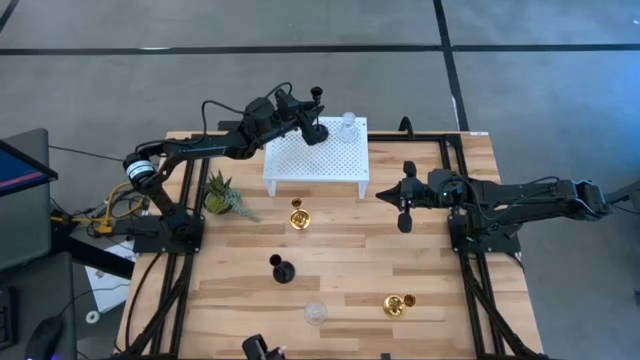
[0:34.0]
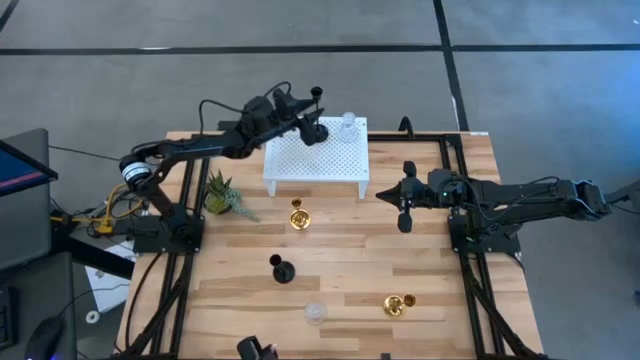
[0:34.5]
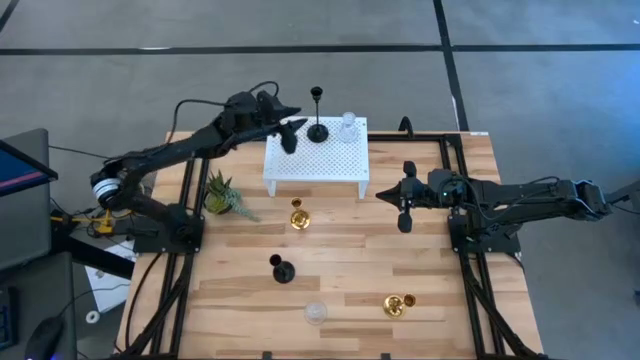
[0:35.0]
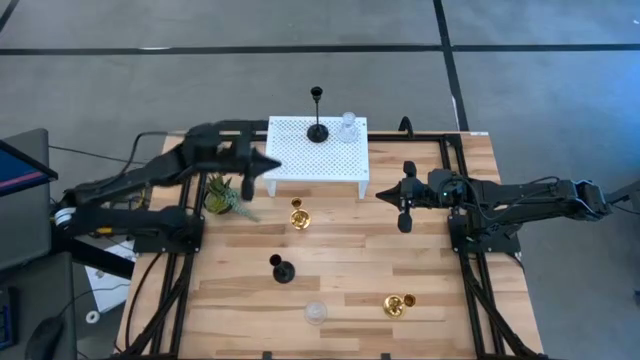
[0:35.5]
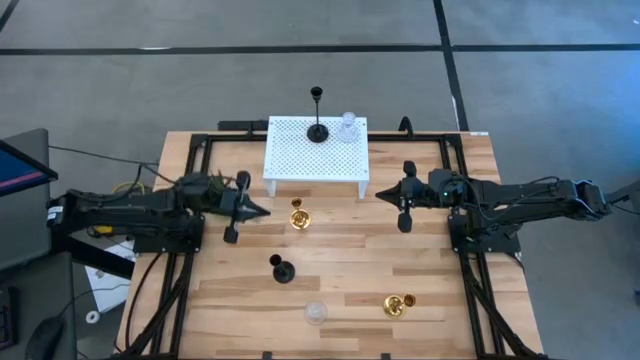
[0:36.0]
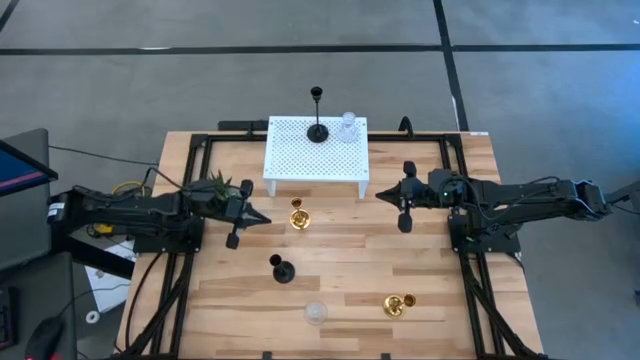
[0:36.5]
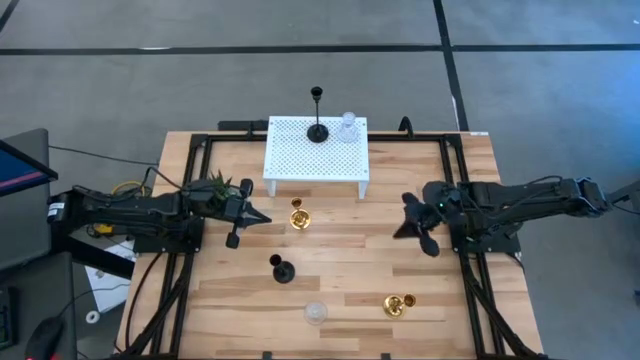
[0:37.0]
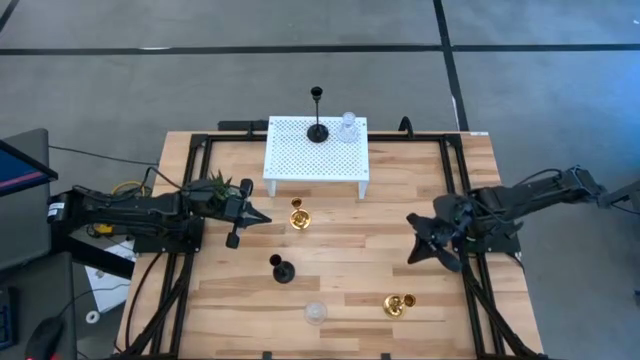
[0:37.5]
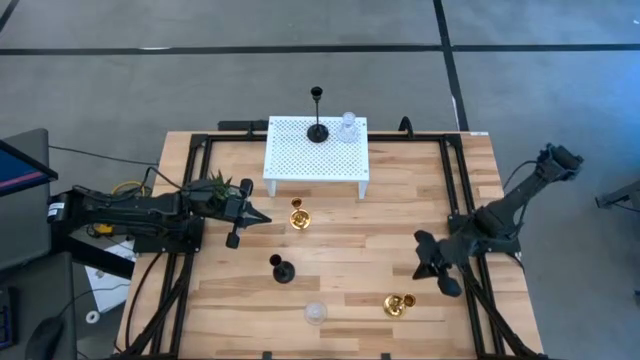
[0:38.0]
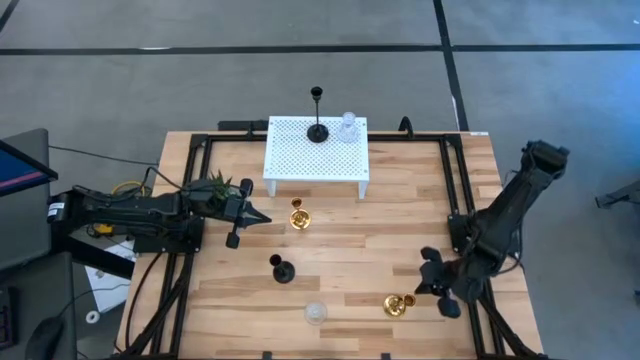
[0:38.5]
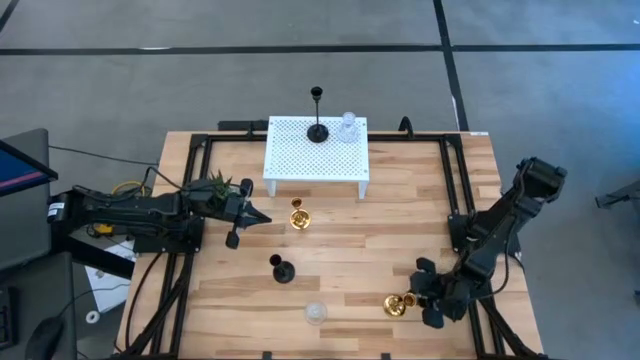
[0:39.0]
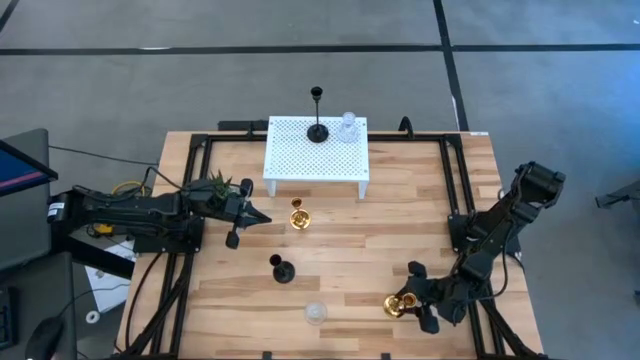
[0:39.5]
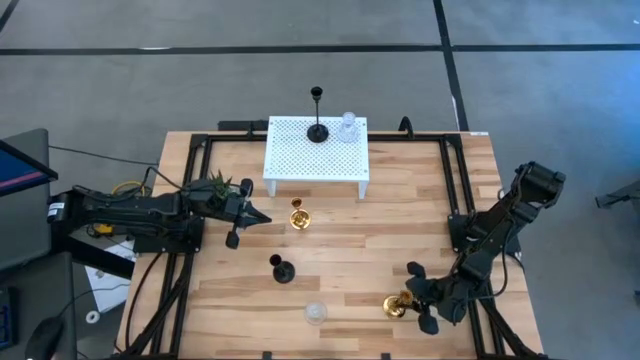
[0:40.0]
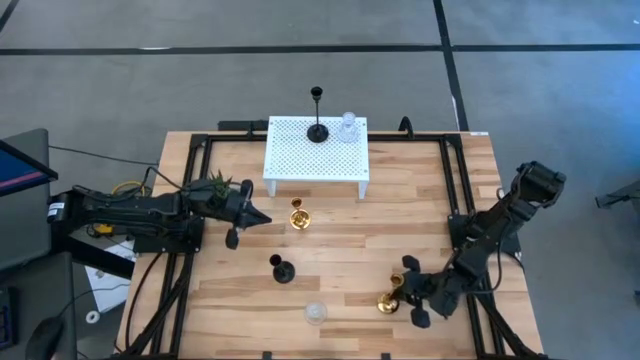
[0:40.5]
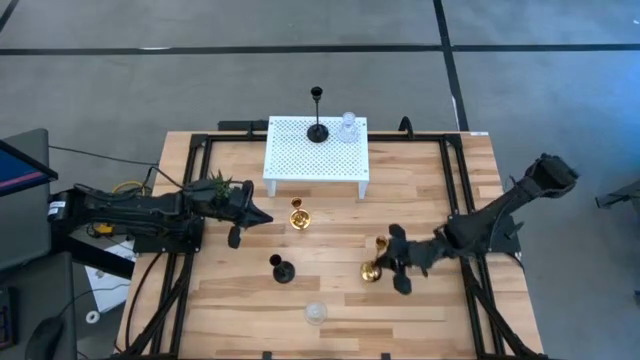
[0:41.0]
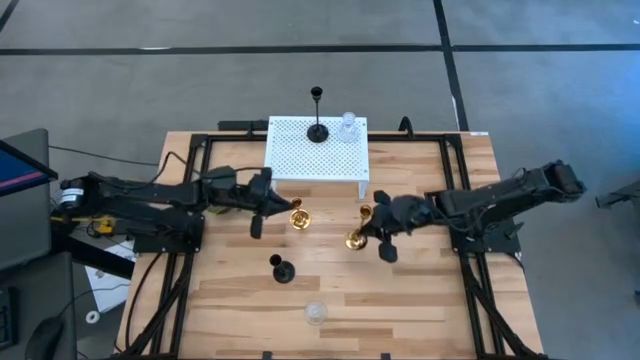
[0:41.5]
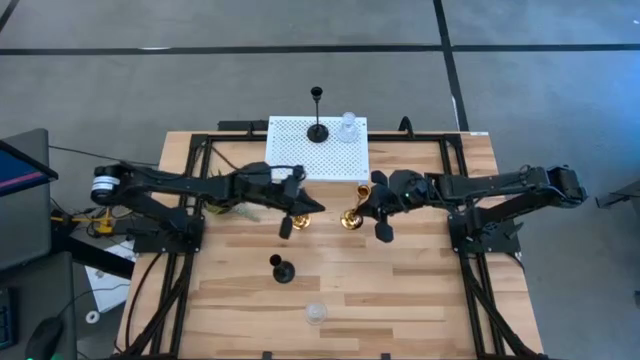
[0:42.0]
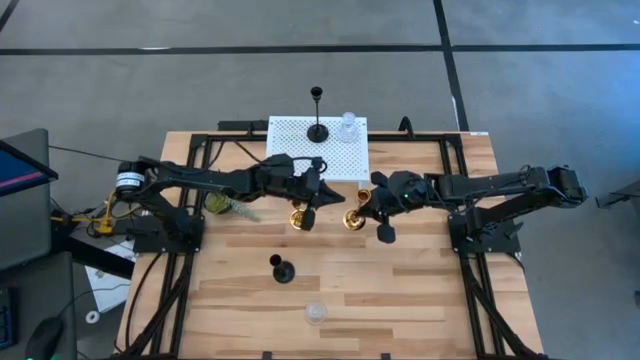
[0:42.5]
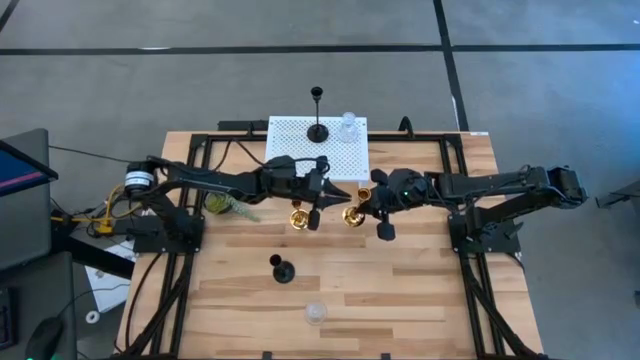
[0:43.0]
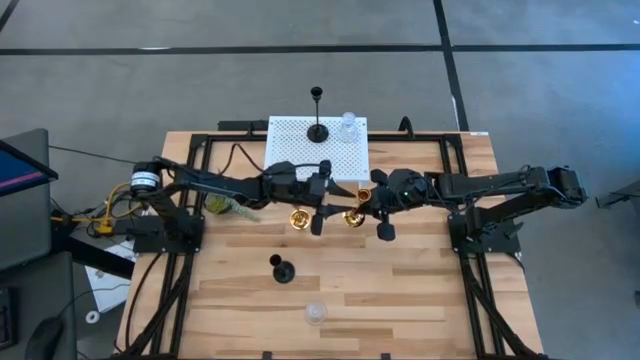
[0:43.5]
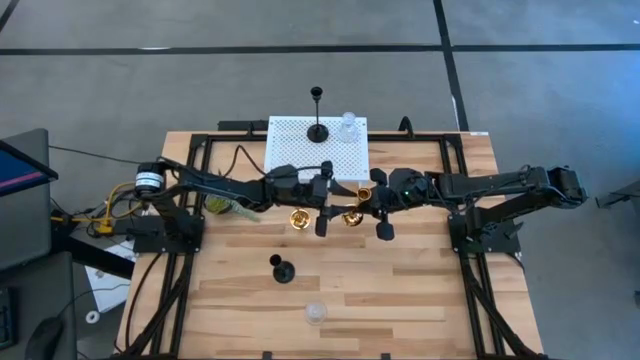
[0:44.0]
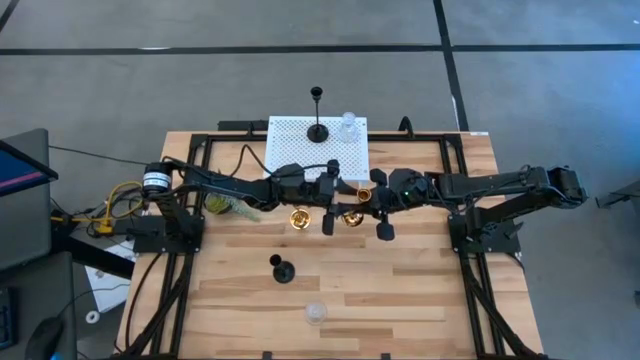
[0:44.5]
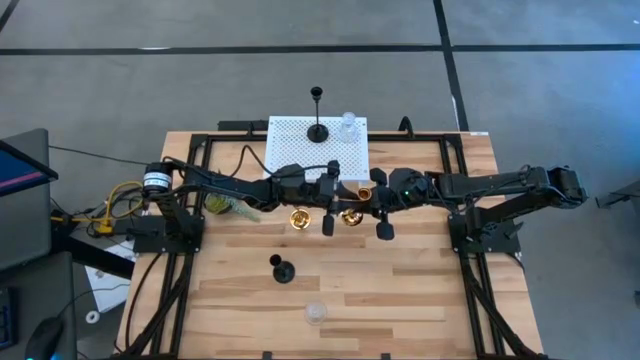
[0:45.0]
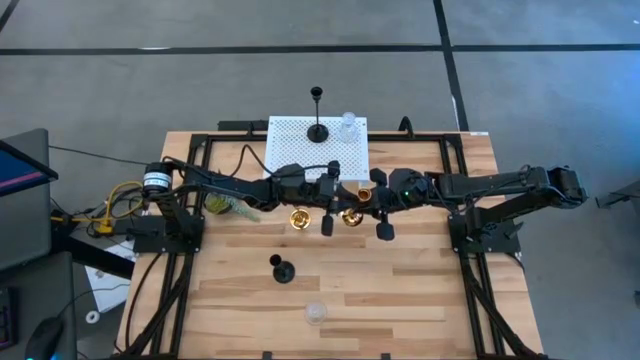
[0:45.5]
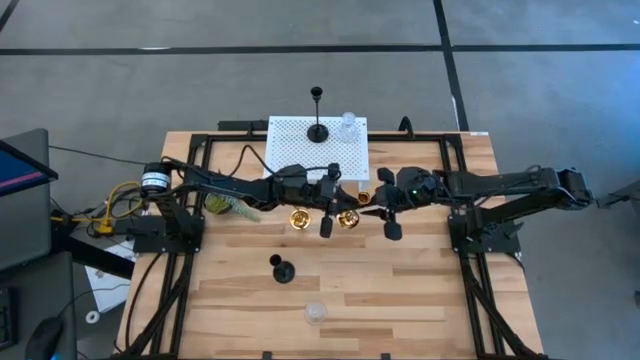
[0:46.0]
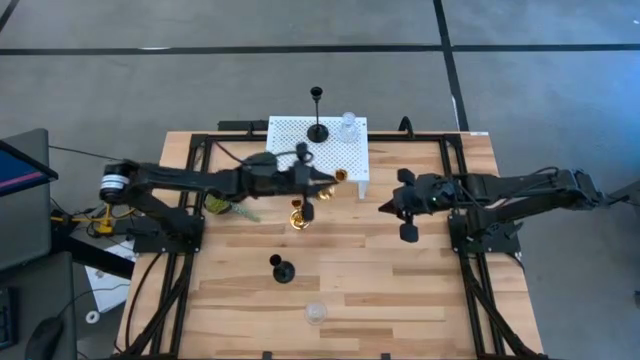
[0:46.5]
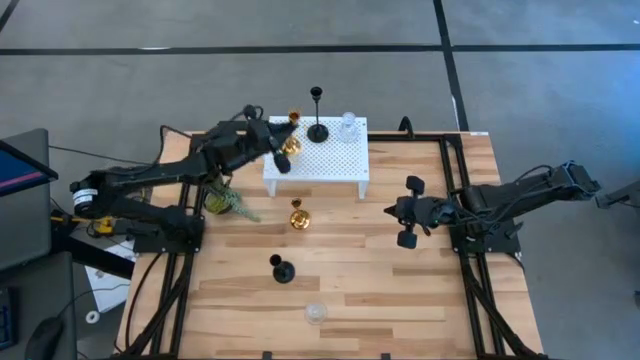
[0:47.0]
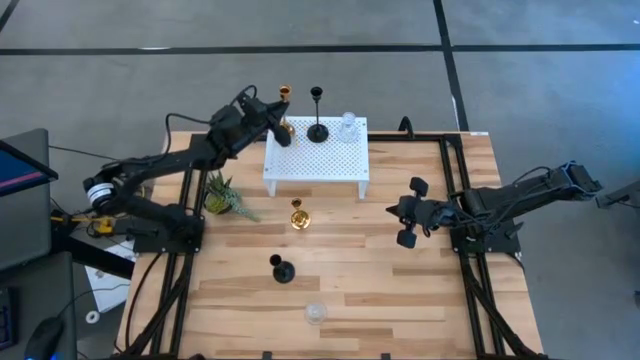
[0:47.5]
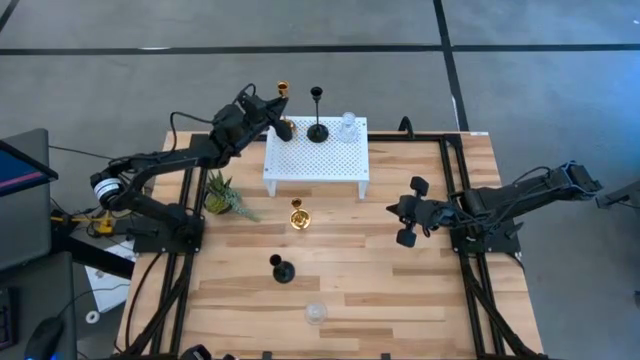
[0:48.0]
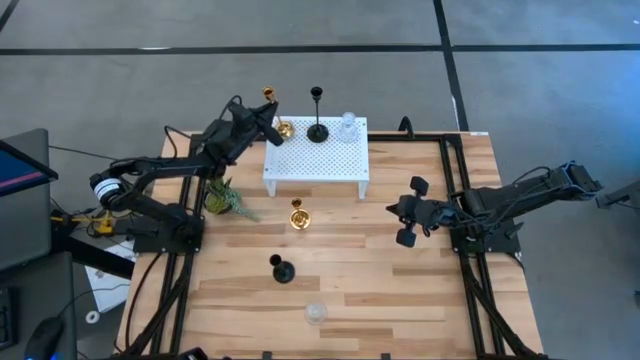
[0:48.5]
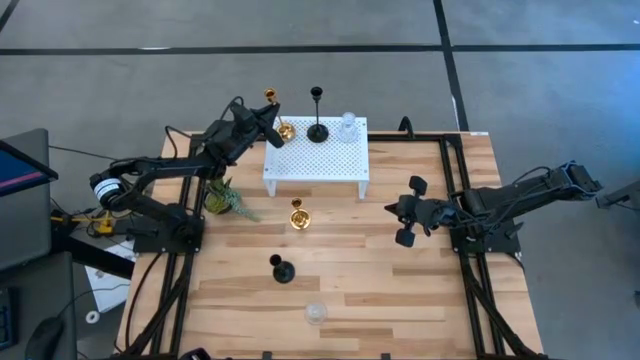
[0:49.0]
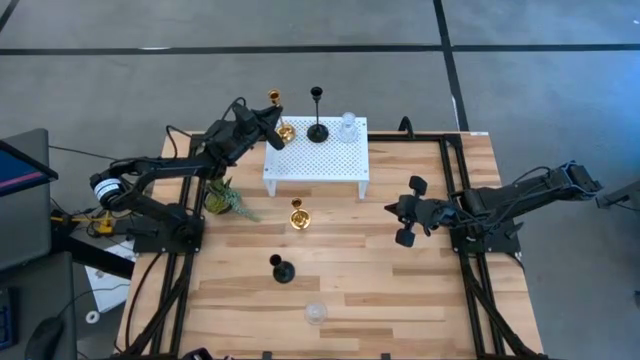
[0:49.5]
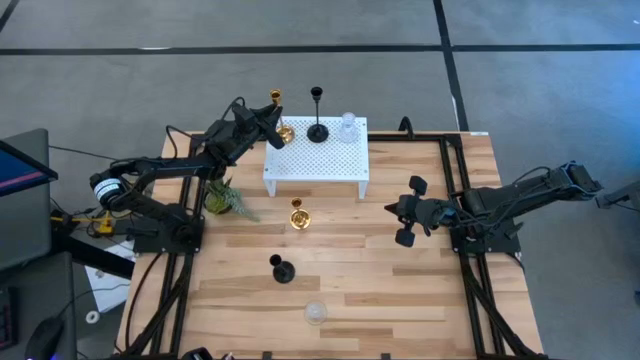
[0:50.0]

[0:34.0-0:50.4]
Task: Pick & Place candle stick holders
Put the bottom gold metal candle stand on the shelf

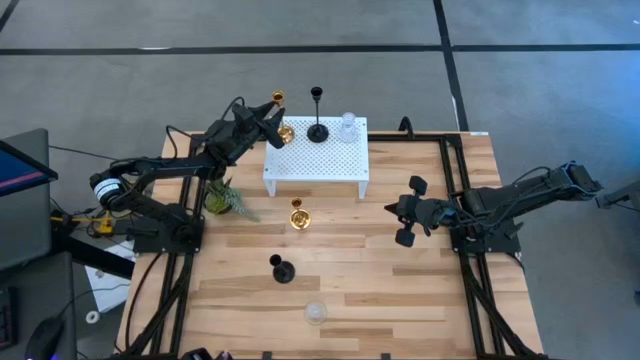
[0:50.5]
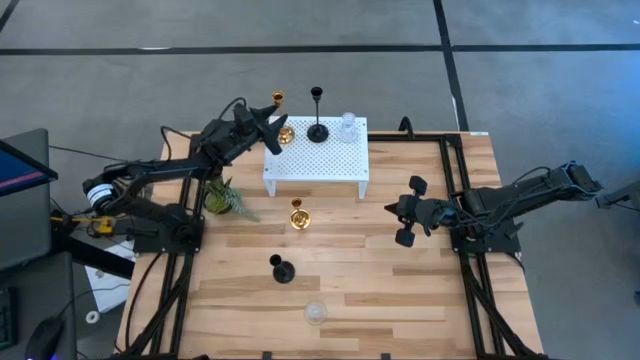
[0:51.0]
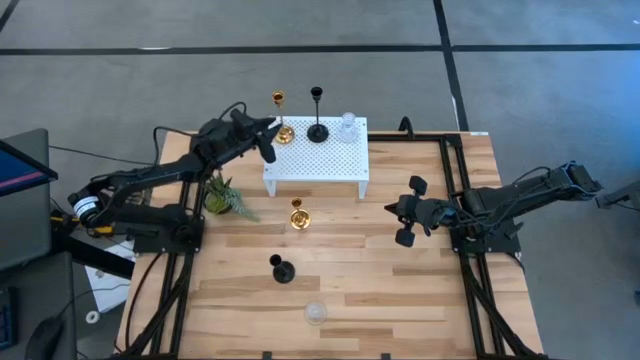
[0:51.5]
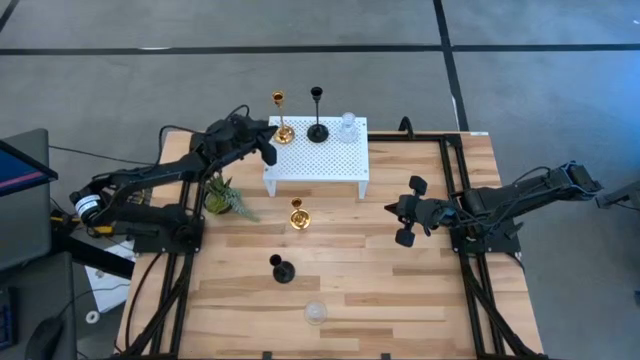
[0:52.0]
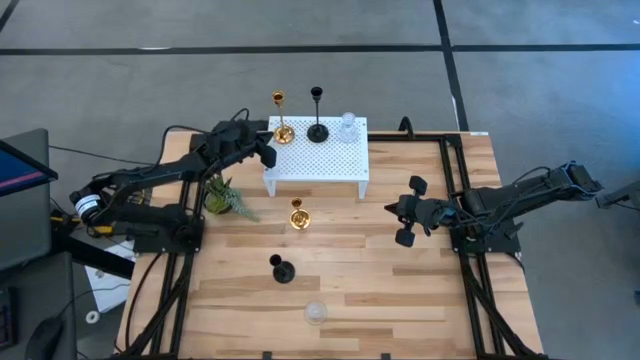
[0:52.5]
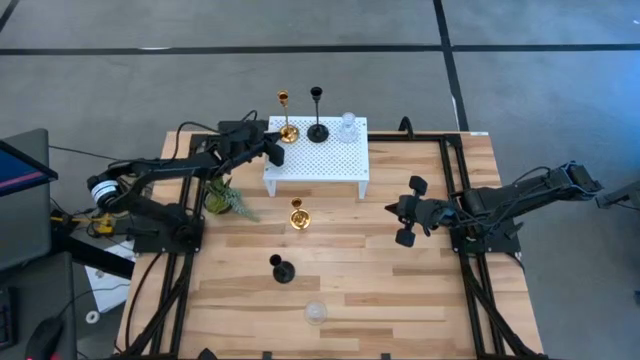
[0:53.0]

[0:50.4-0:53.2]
Adjust the gold metal candle stand on the shelf

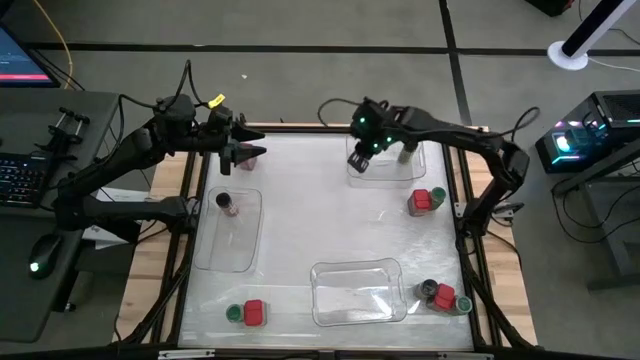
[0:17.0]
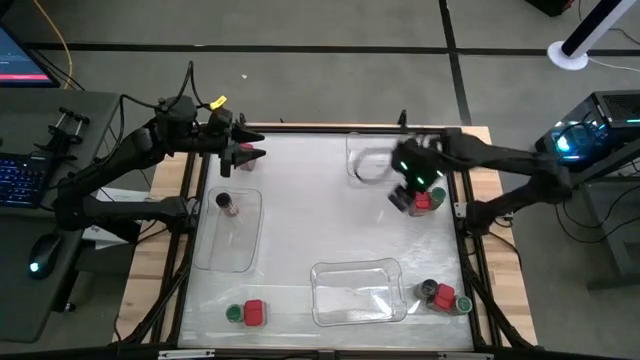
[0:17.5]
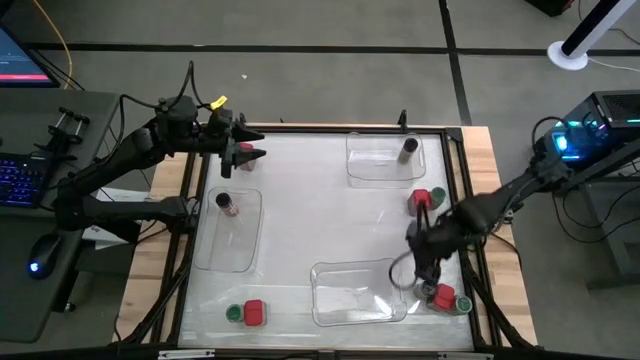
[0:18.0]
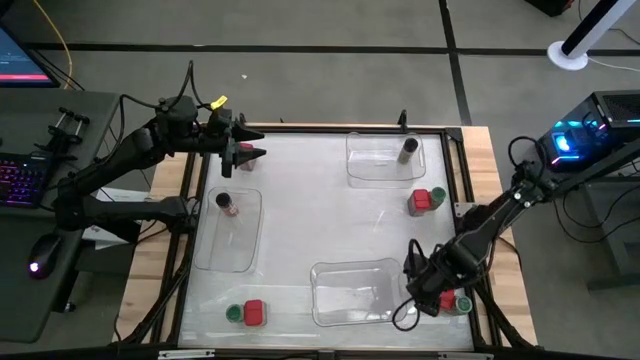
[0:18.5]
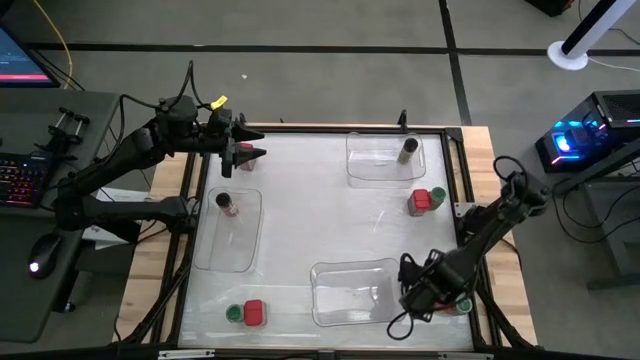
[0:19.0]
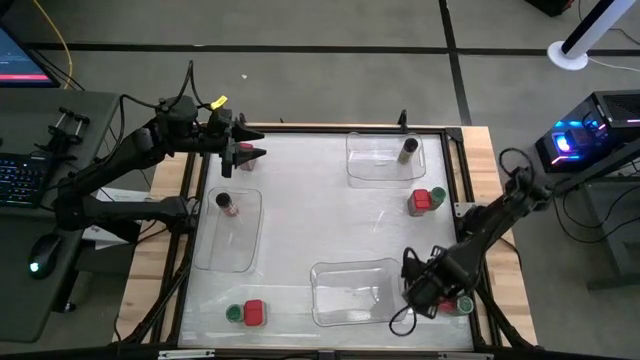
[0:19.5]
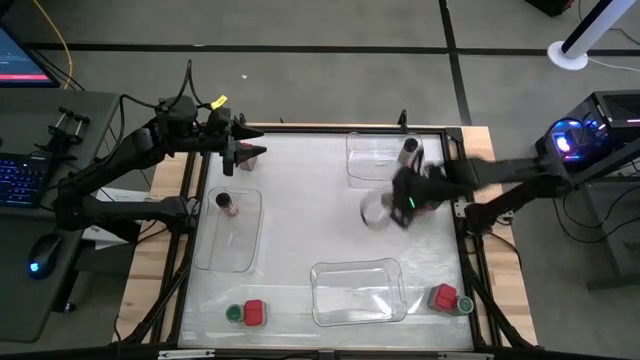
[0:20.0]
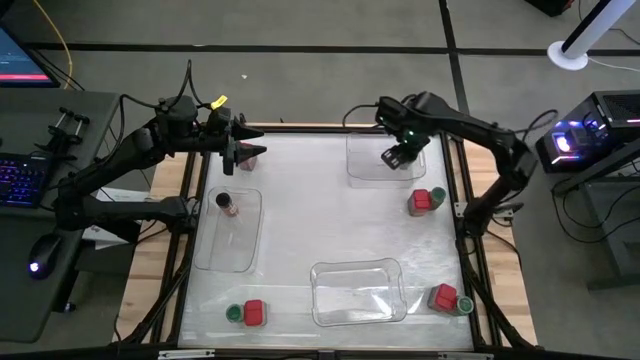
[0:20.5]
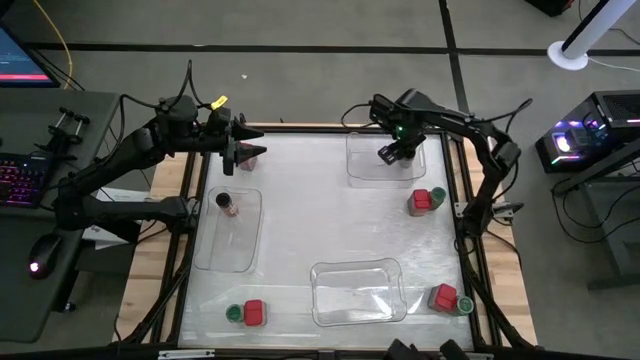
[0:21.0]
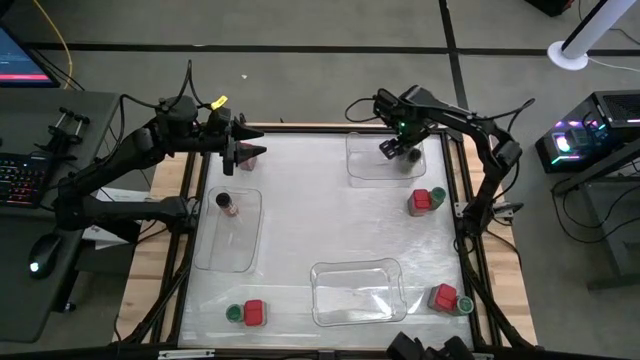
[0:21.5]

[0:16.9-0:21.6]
Task: Sort spices by type
Put the black seasoning bottle into the top right transparent bin
